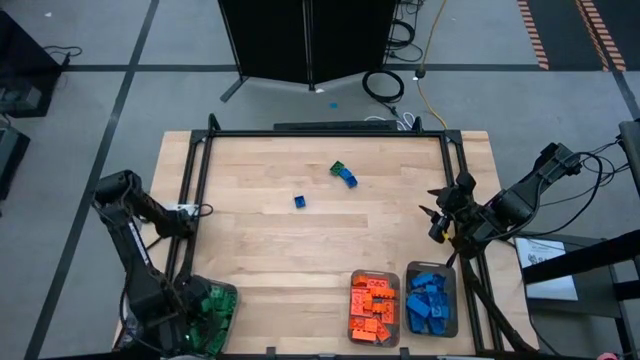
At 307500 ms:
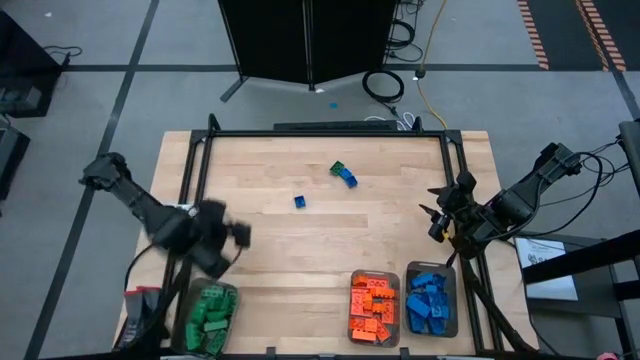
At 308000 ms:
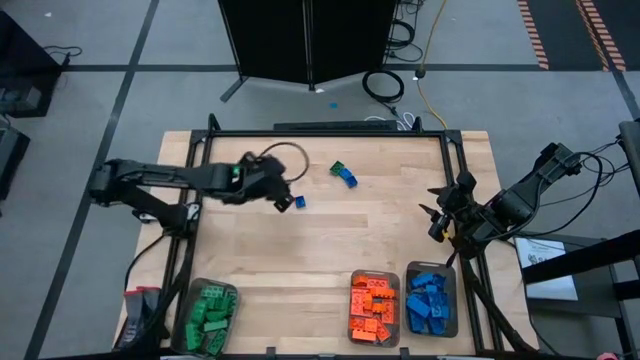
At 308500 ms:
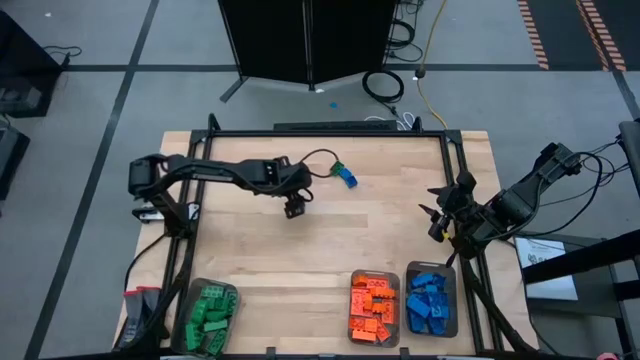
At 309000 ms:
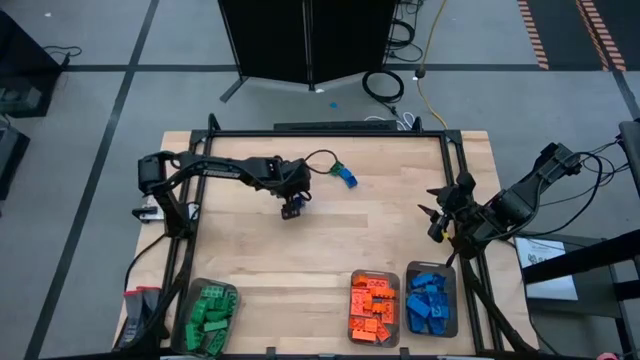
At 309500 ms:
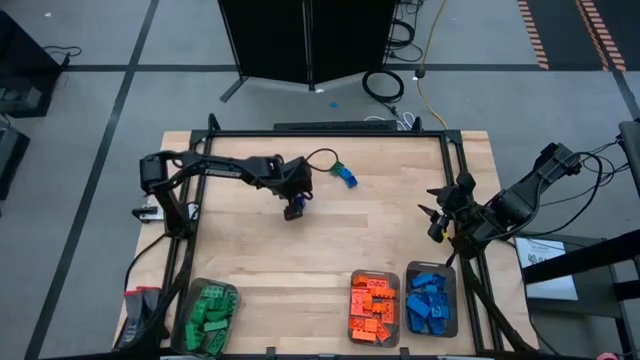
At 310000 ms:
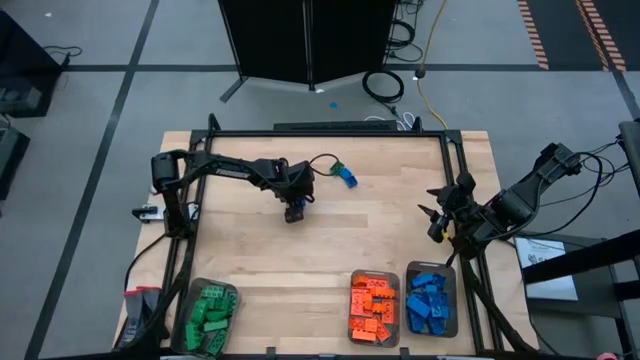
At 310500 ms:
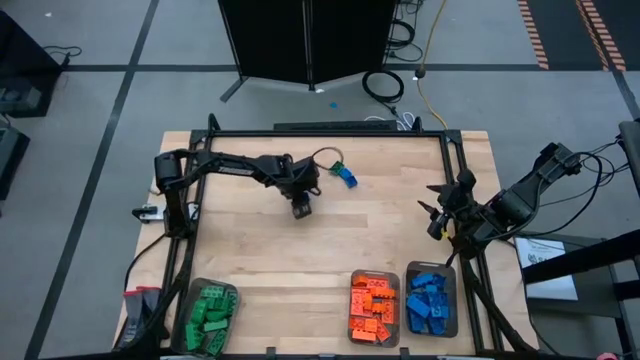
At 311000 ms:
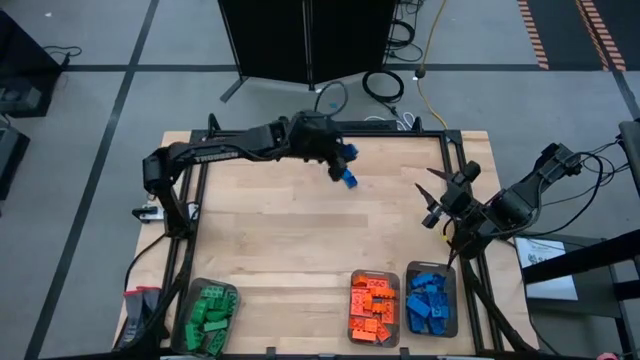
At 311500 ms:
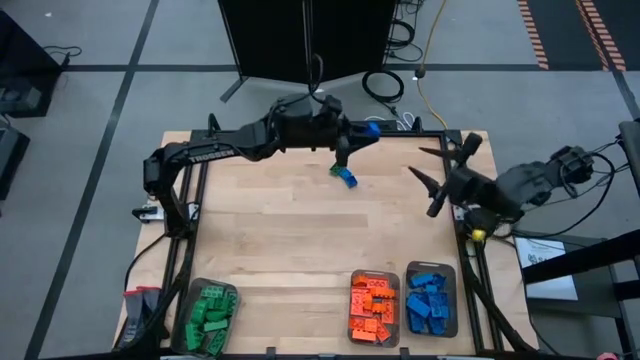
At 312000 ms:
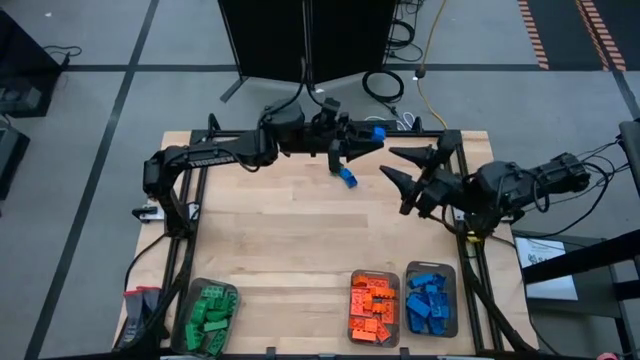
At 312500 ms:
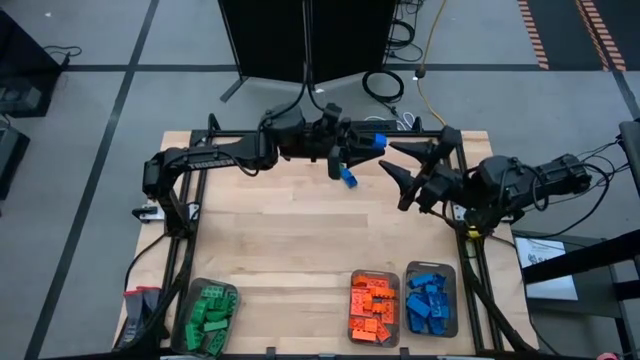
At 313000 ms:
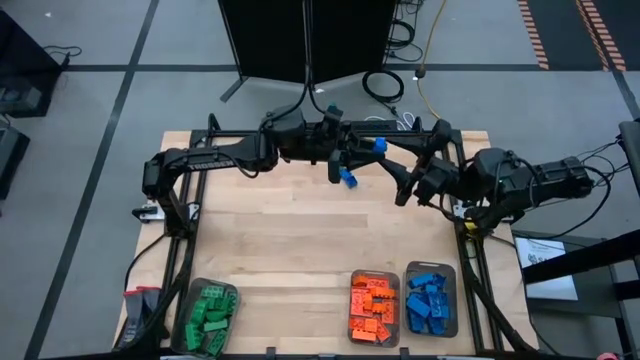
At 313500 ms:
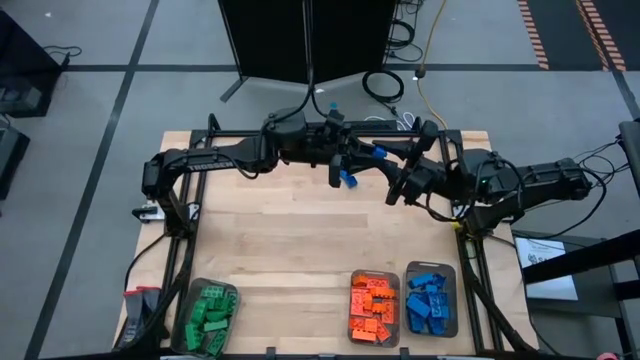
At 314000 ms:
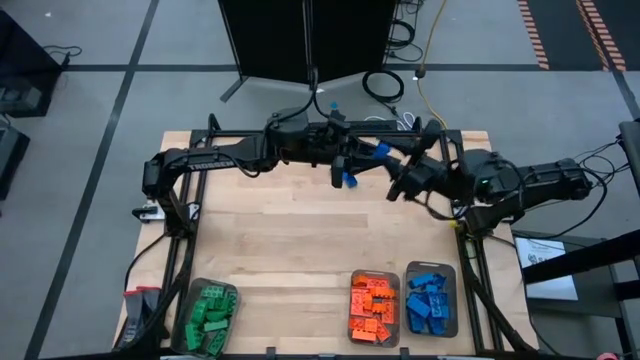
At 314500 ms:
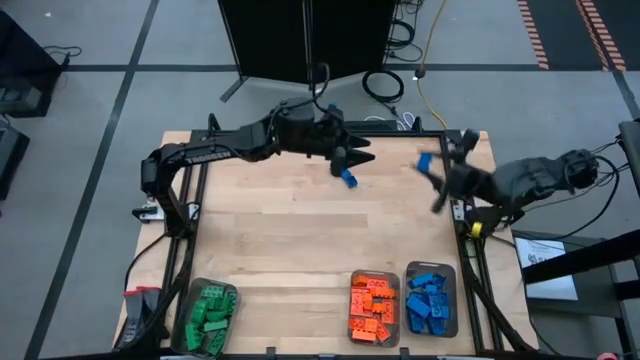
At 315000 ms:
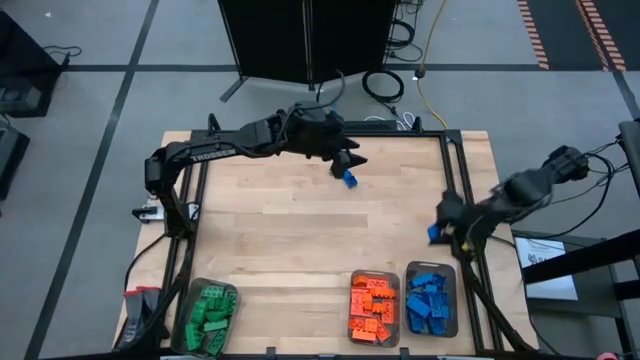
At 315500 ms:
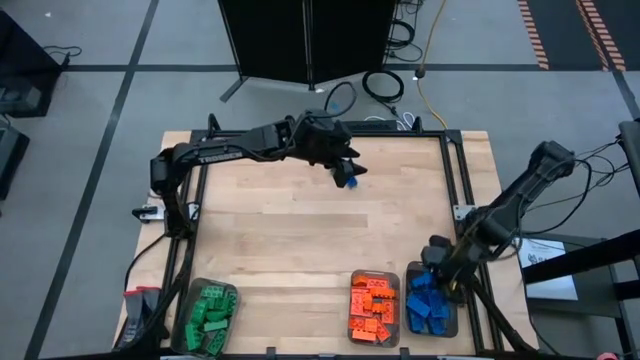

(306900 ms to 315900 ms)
Task: Sort blocks
Put the blue game piece into the right black bin

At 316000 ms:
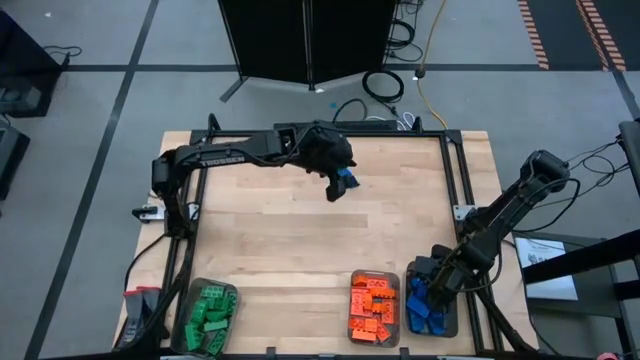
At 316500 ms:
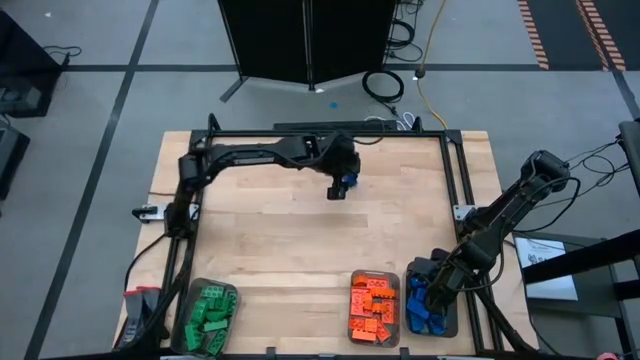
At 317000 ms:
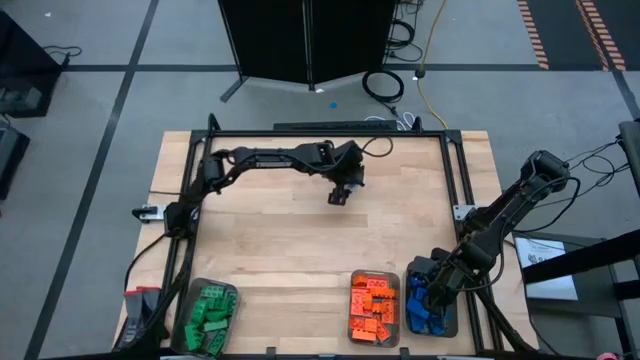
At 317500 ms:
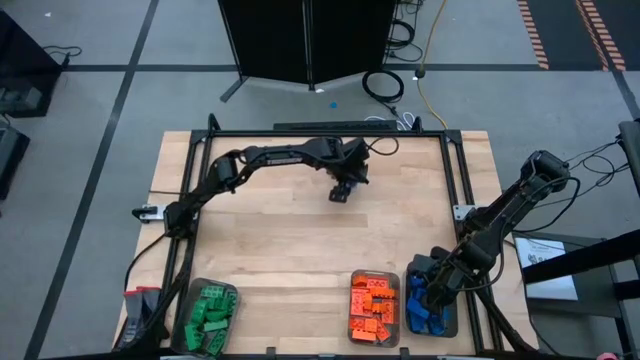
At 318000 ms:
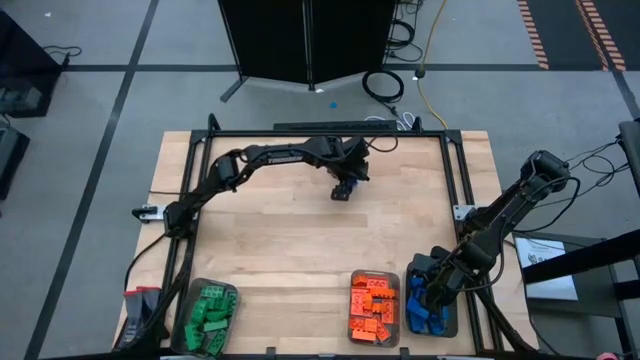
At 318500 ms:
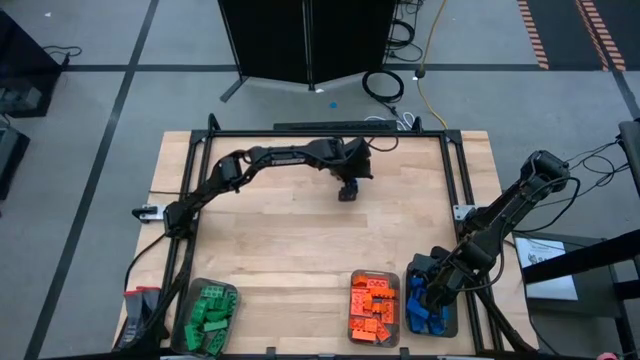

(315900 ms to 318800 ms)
Put the blue game piece into the right black bin

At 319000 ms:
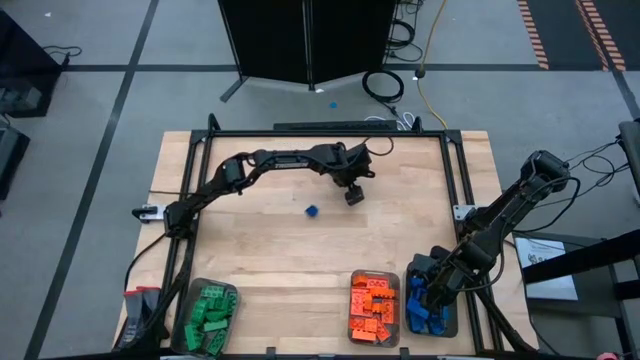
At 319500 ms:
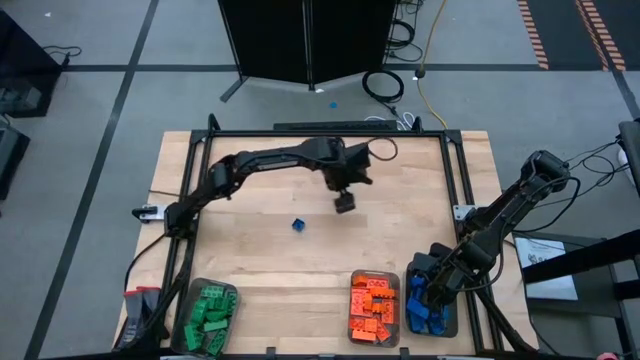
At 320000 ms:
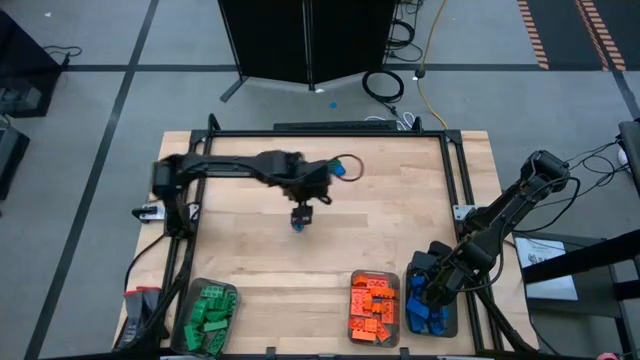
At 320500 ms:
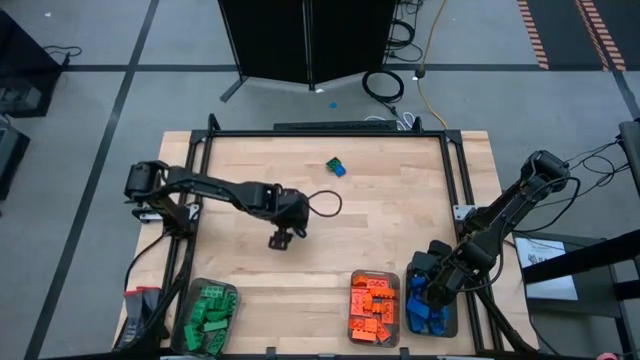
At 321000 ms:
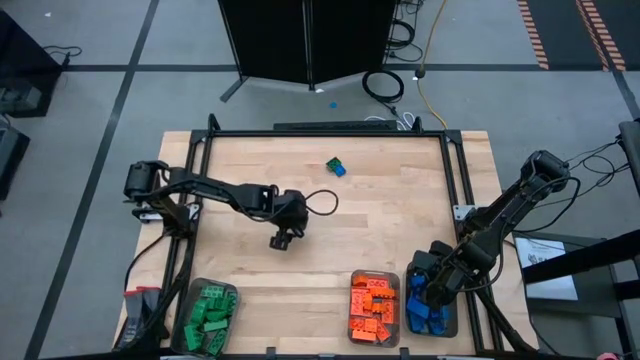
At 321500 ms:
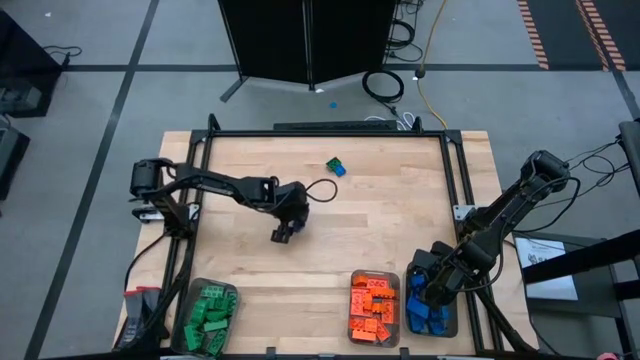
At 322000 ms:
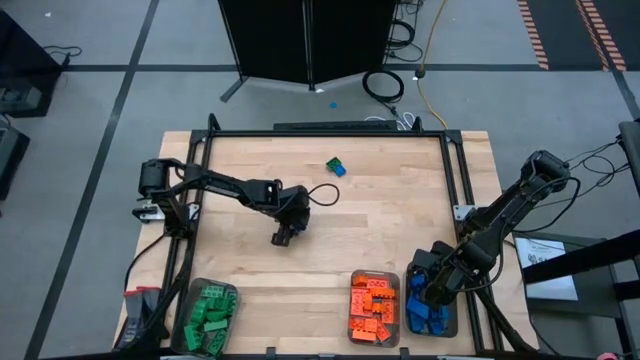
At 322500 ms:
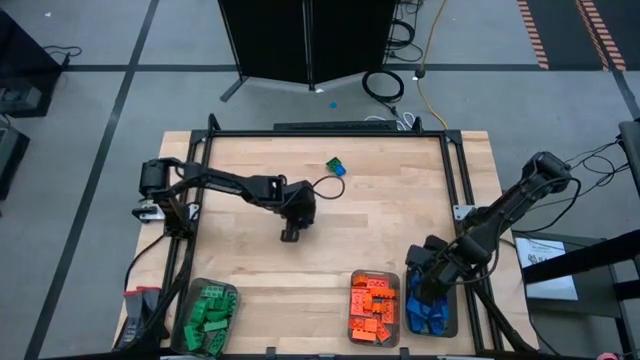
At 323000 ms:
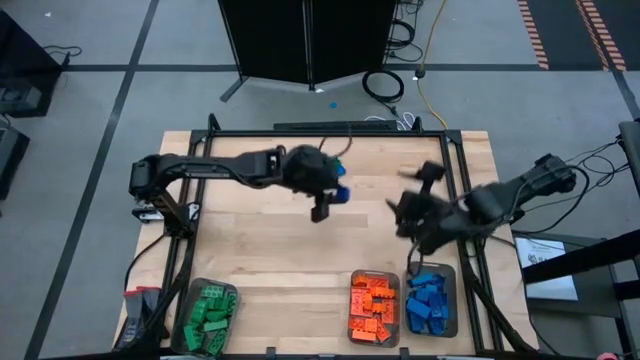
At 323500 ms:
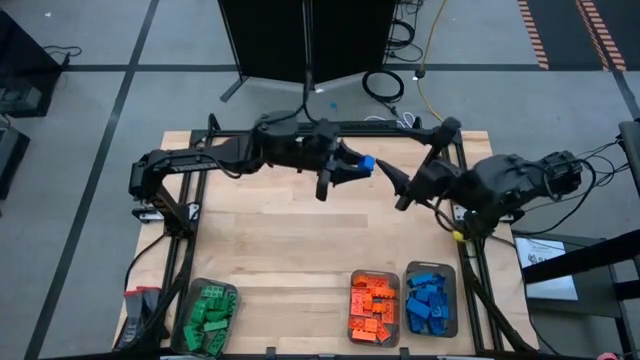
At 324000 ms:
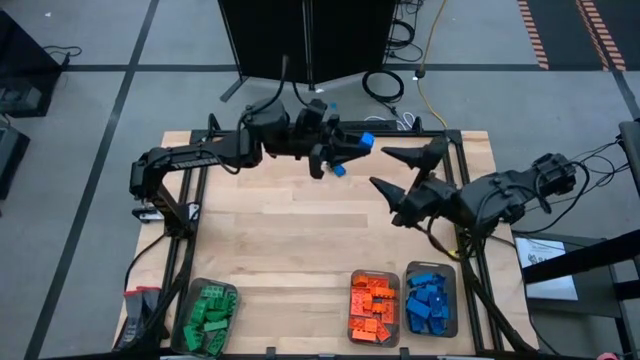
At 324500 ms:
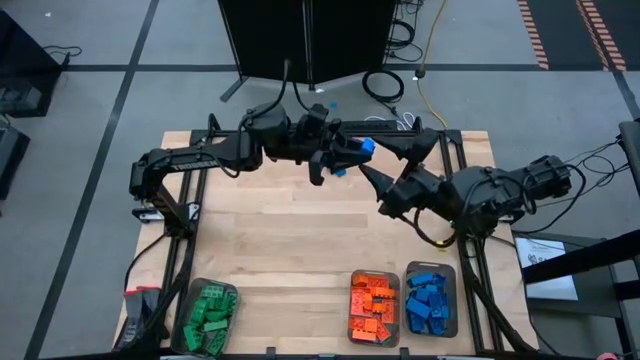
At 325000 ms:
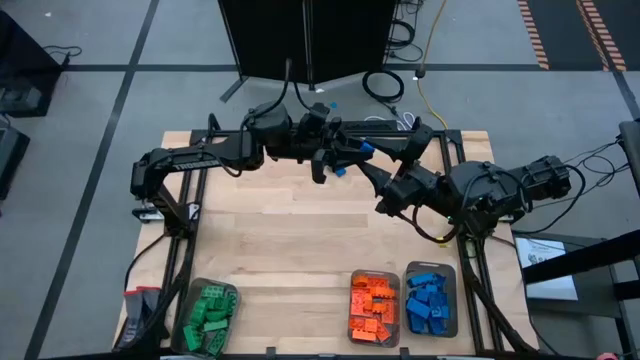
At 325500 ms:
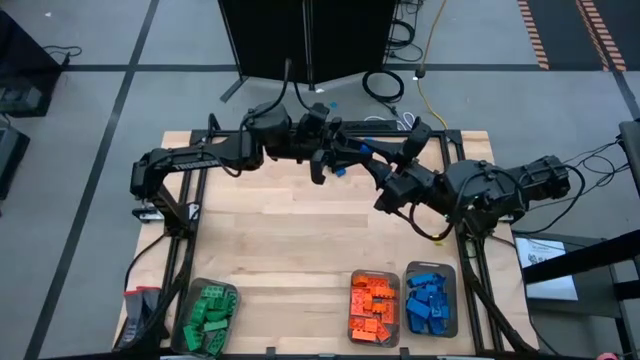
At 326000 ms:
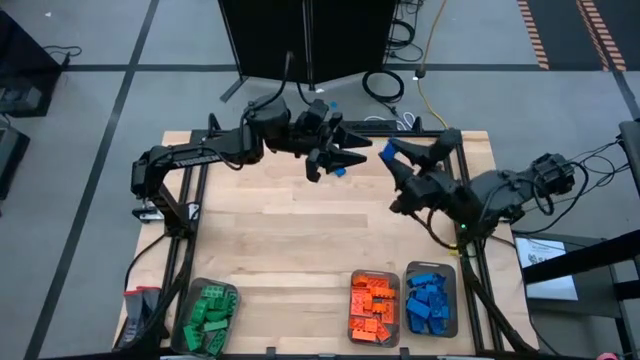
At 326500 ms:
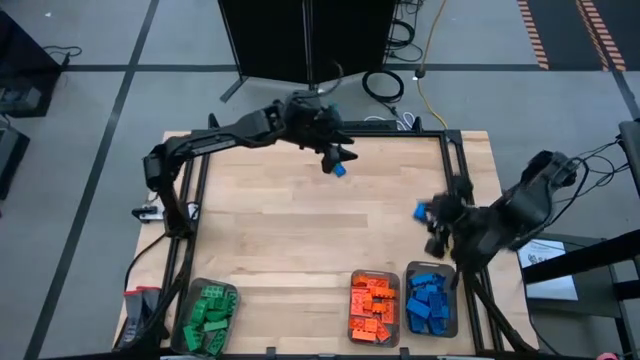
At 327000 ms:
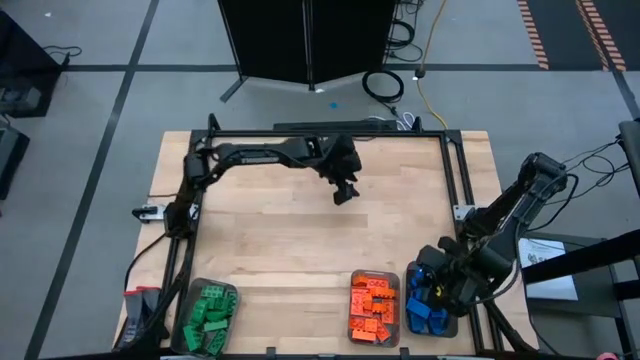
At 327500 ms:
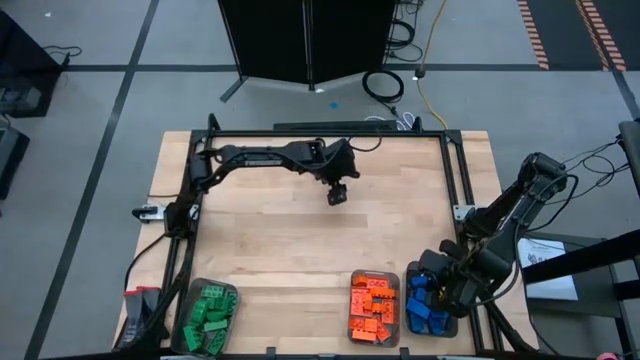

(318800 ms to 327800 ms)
Put the blue game piece into the right black bin
